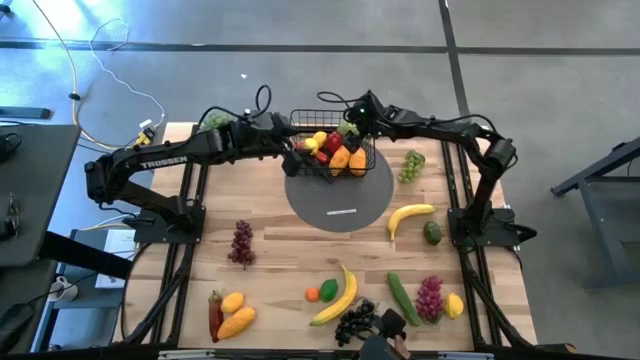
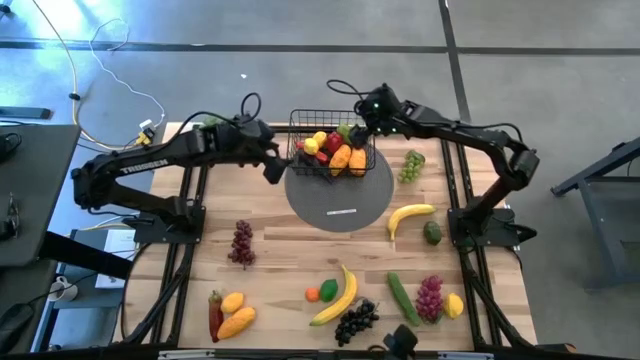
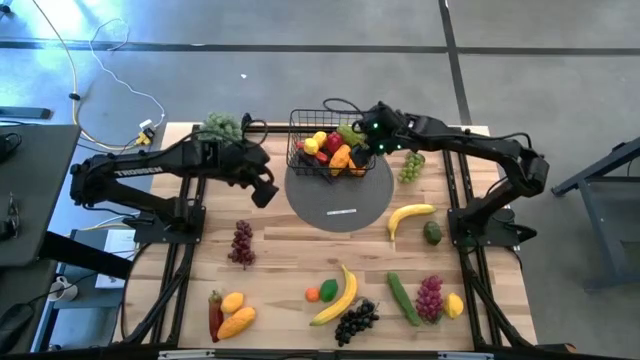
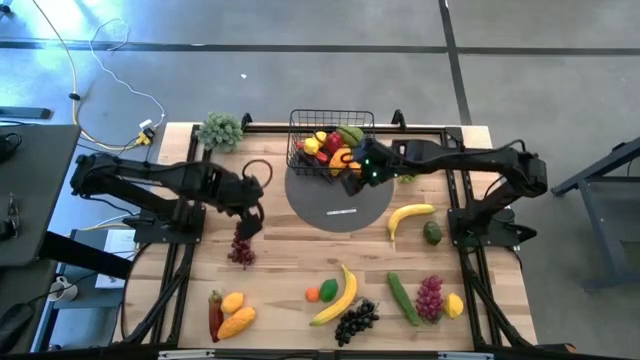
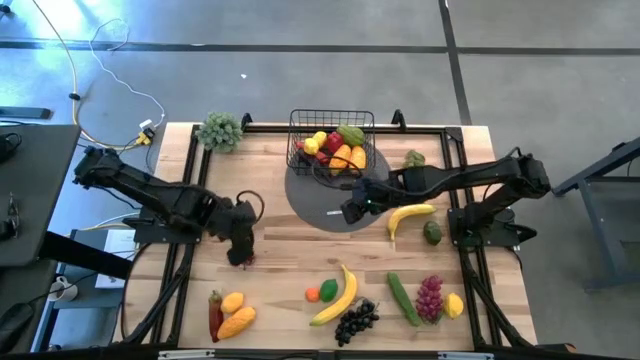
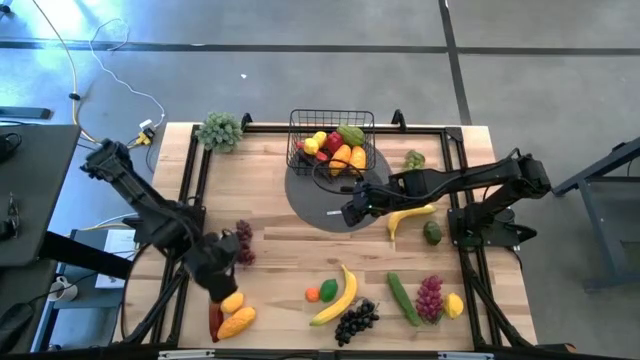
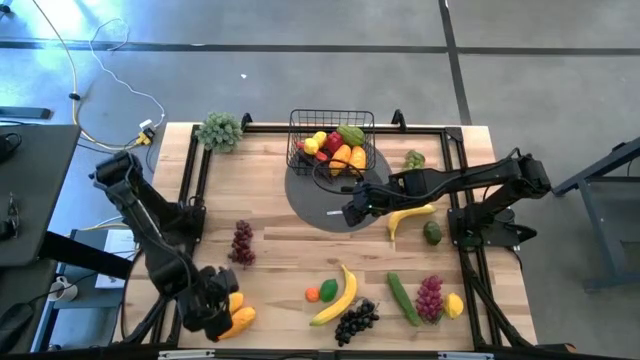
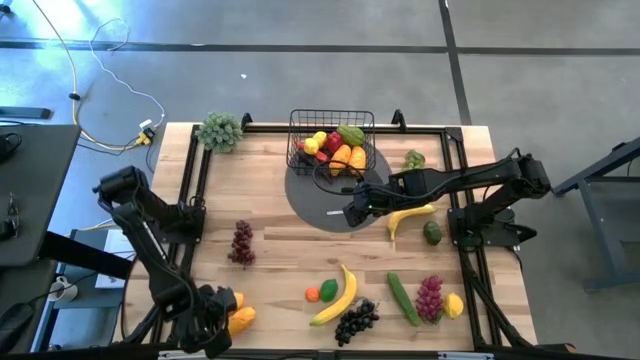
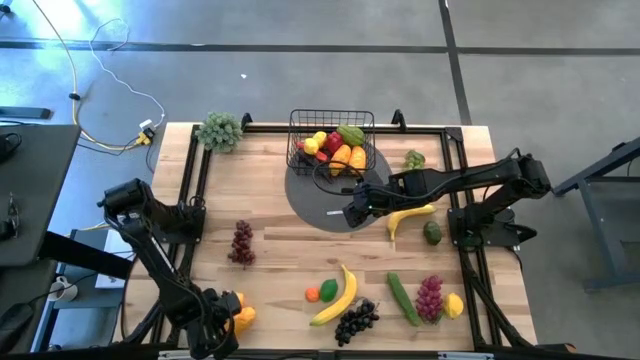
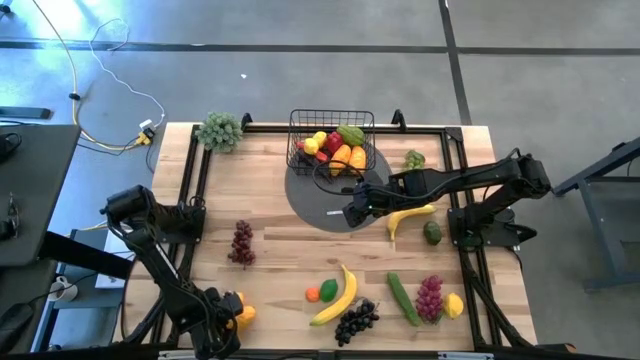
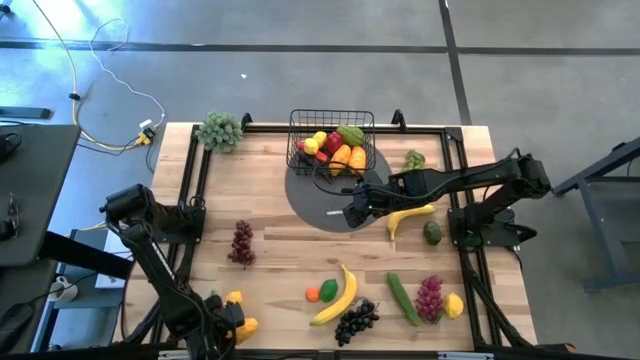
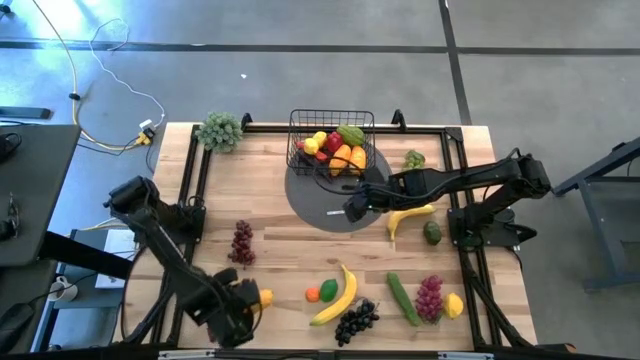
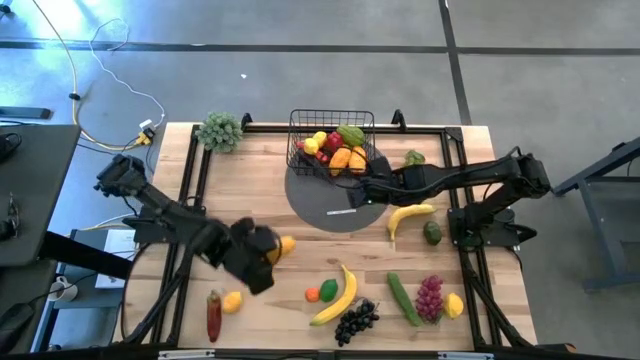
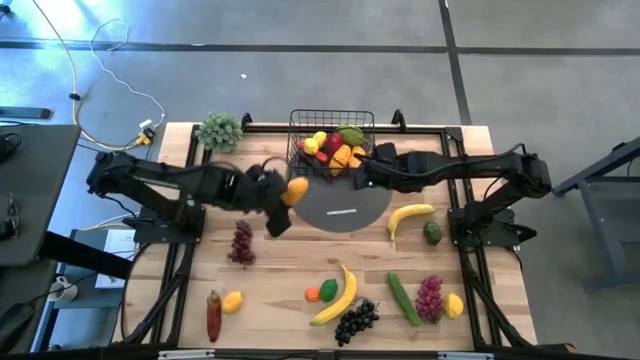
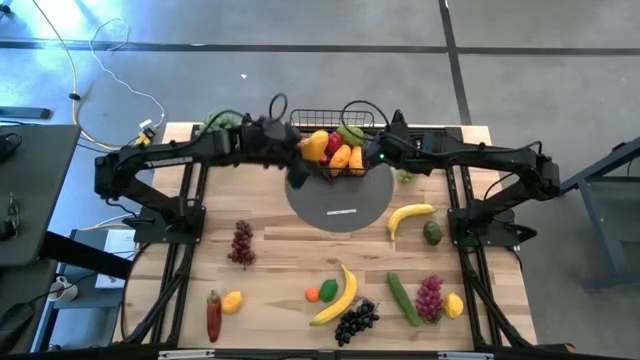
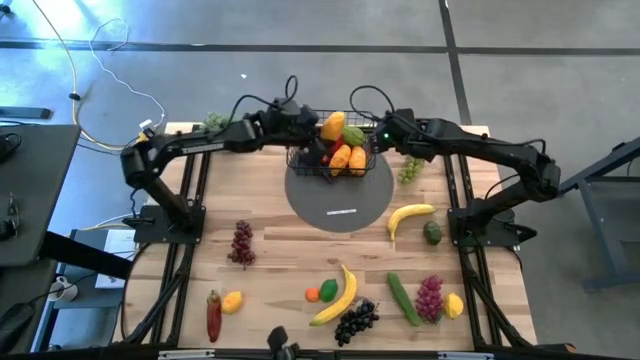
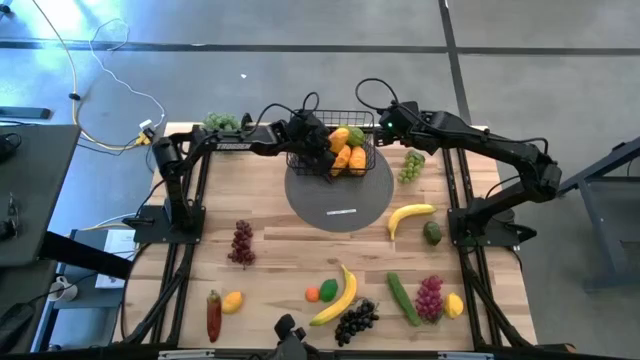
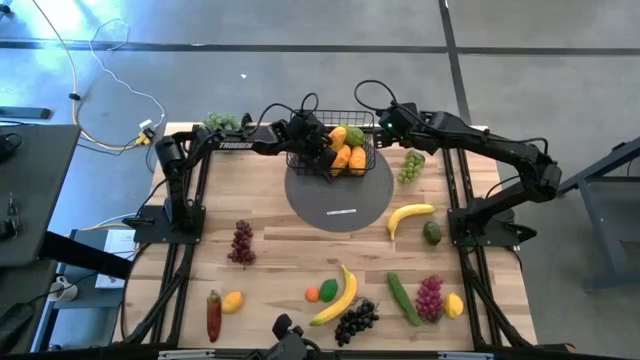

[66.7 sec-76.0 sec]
Task: Build produce basket
Put the mango into the wire basket

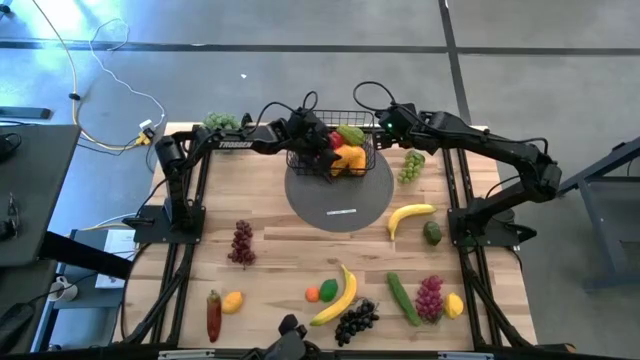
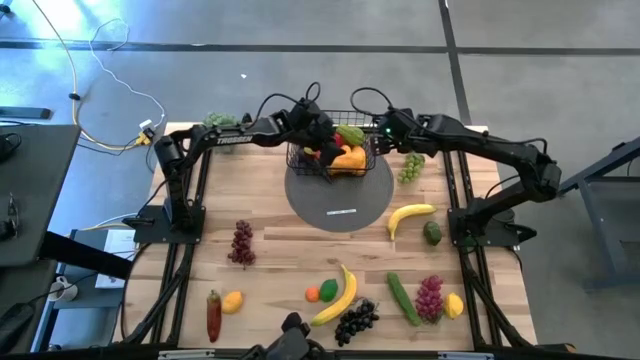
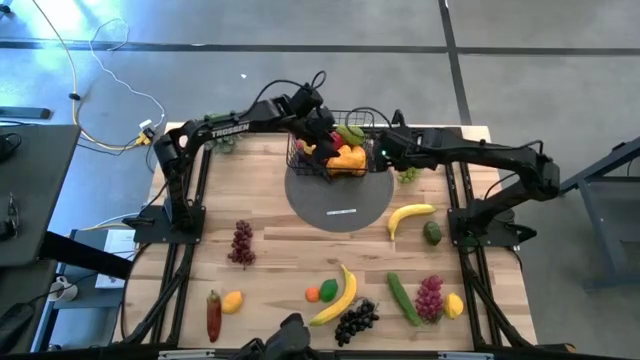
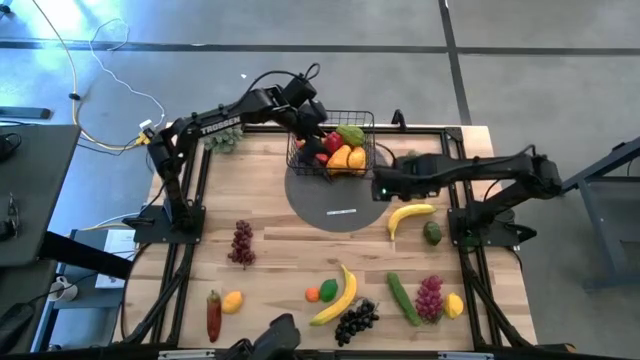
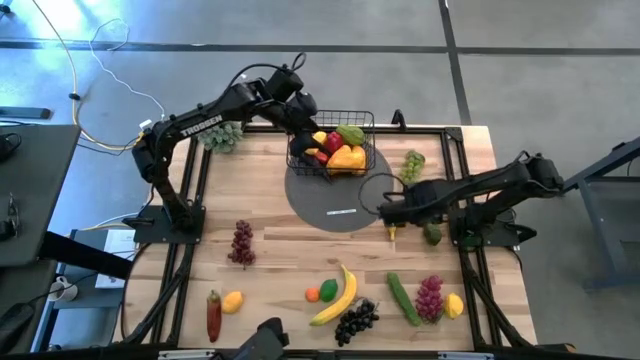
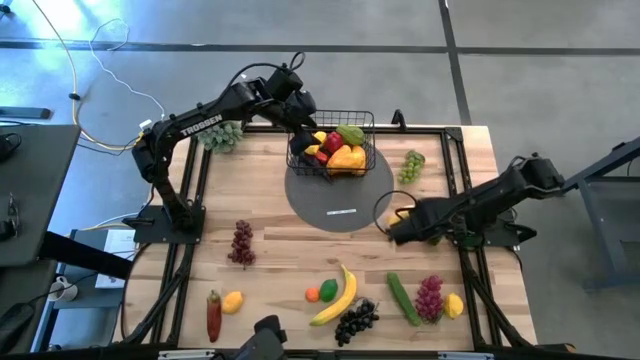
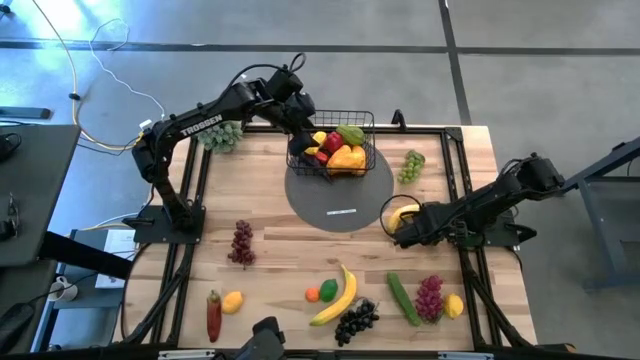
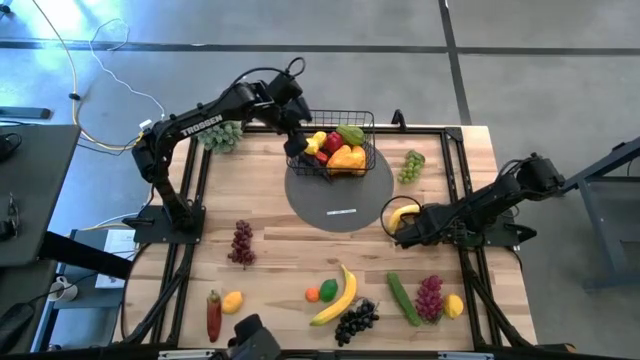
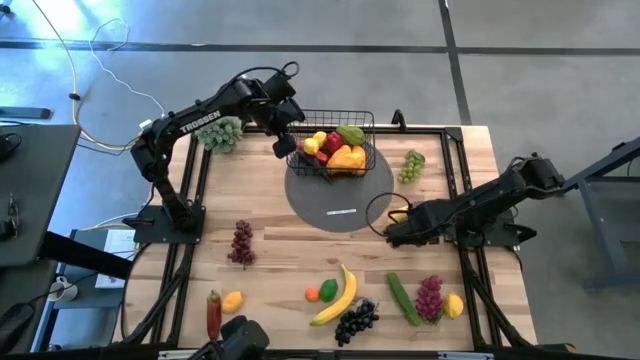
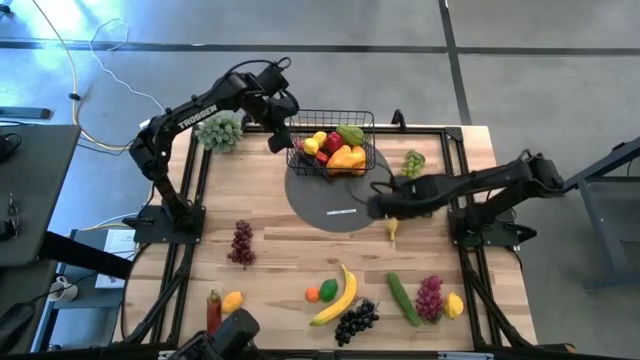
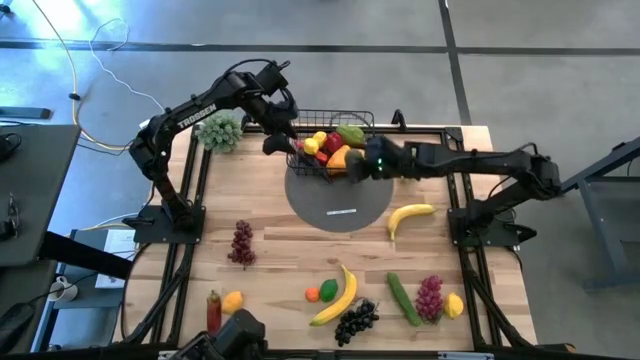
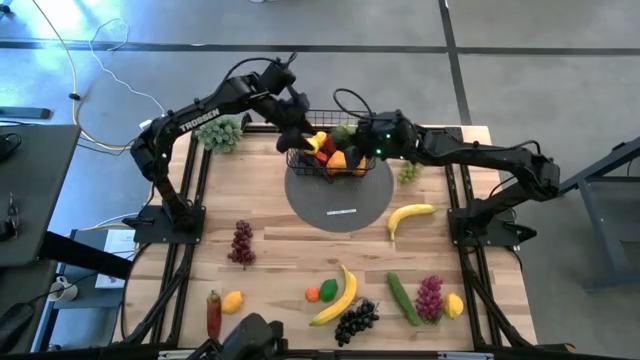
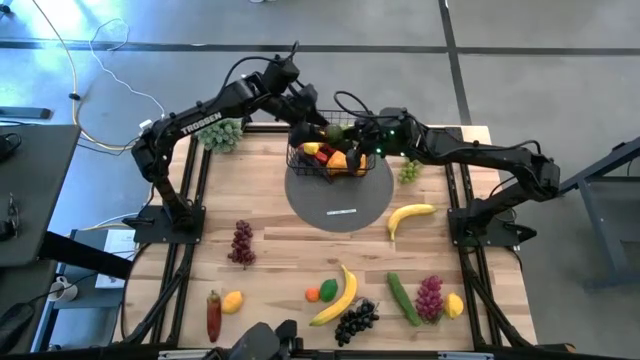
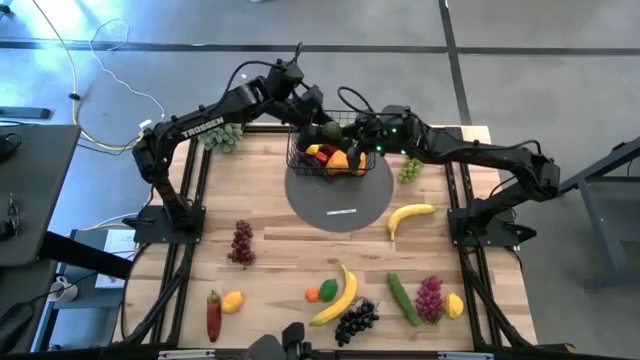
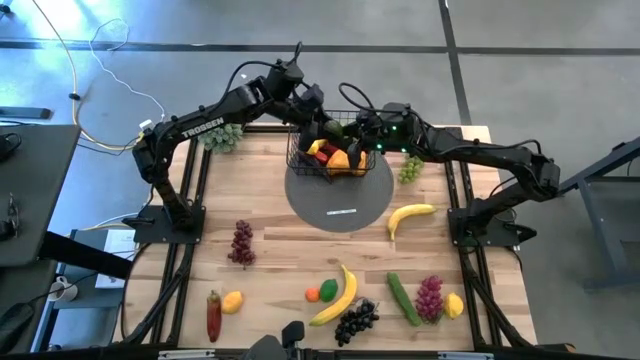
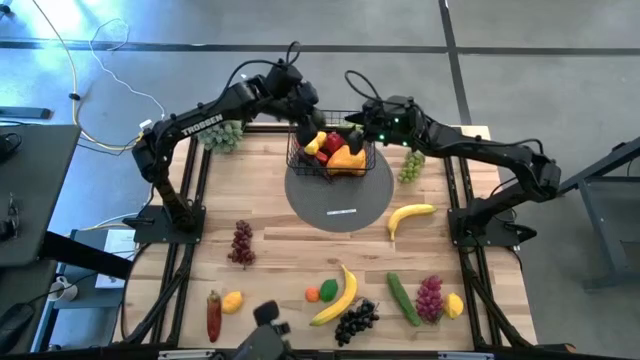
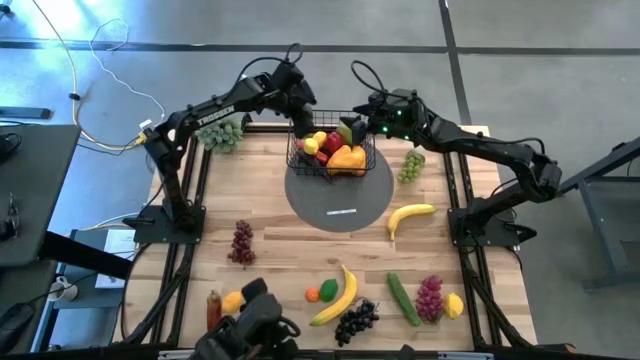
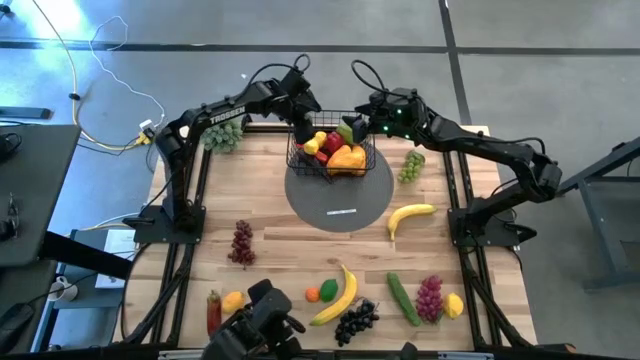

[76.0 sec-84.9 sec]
Put the lime into the wire basket

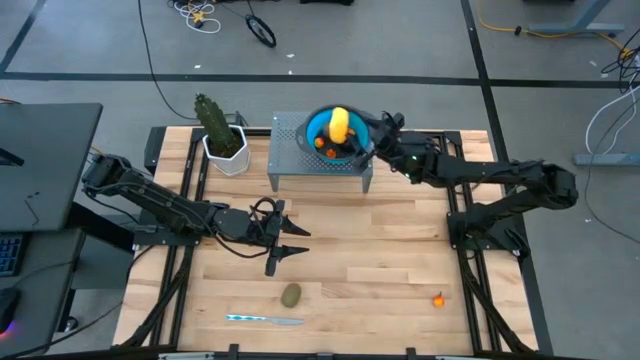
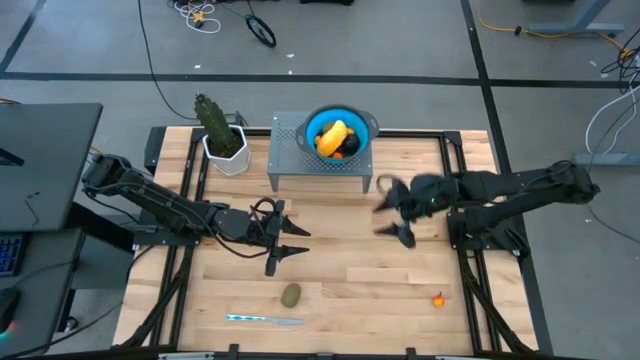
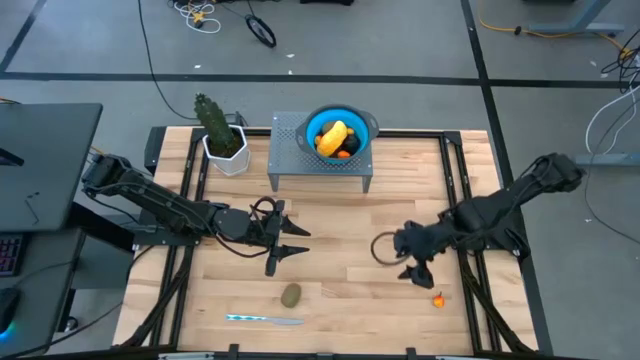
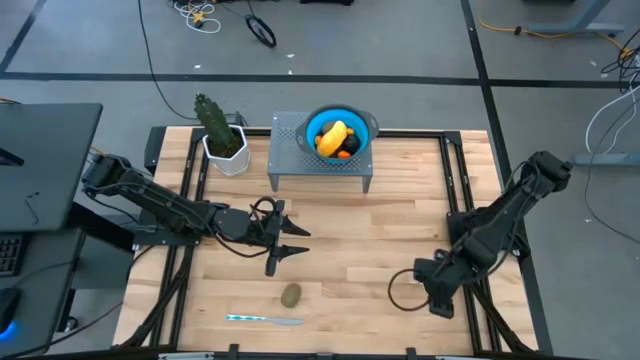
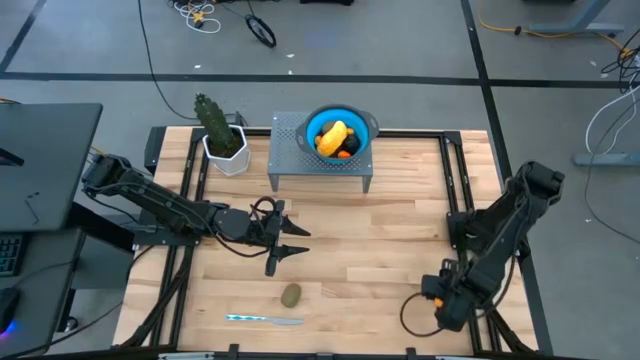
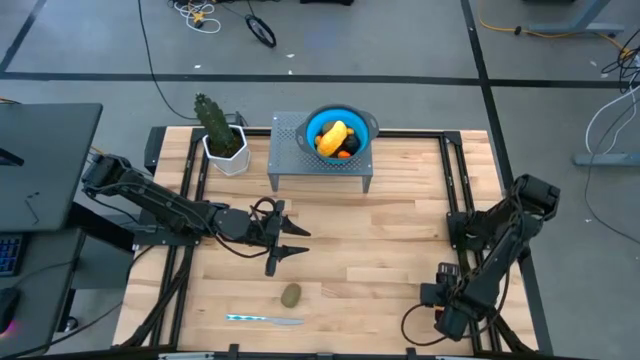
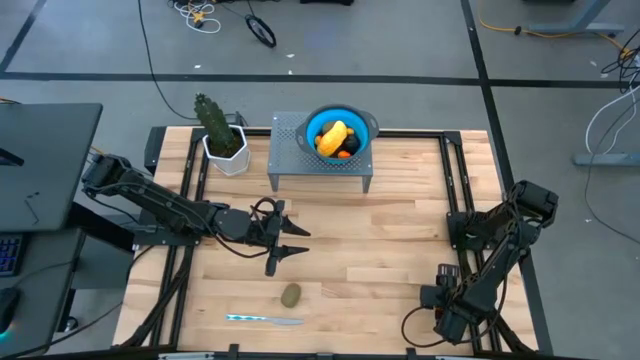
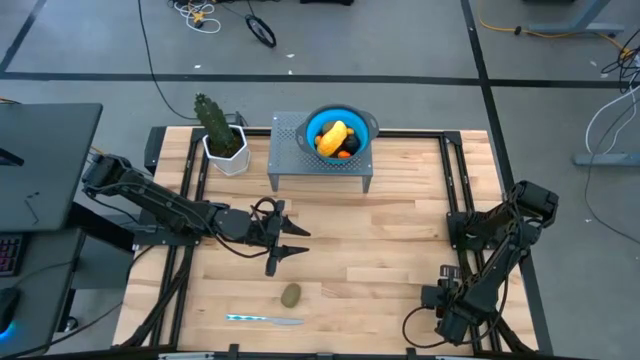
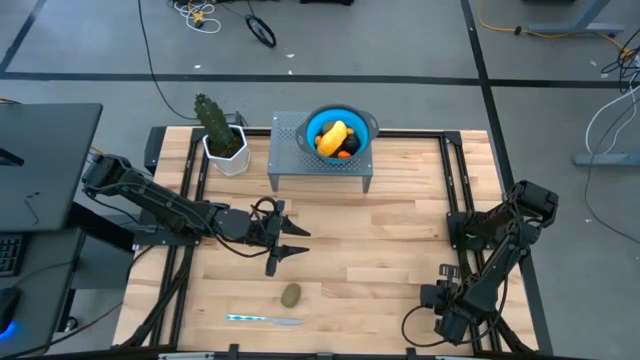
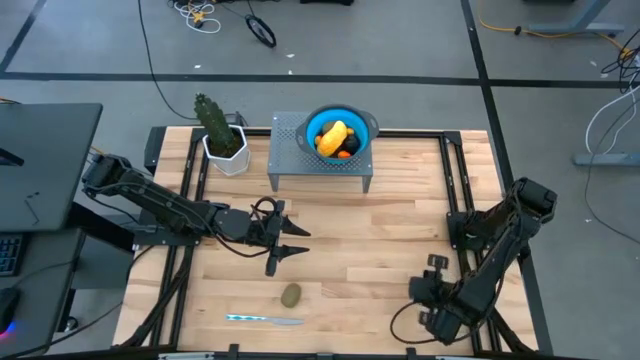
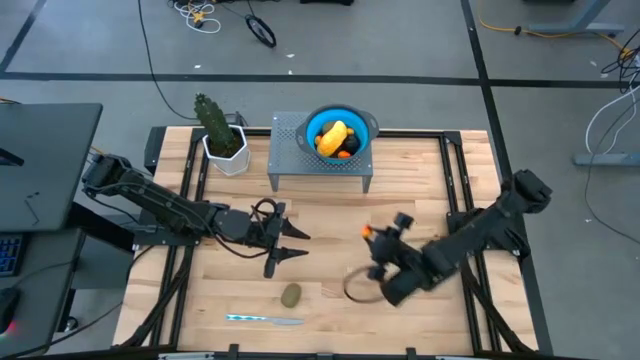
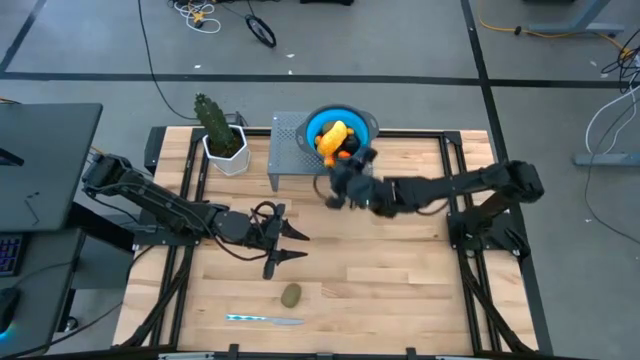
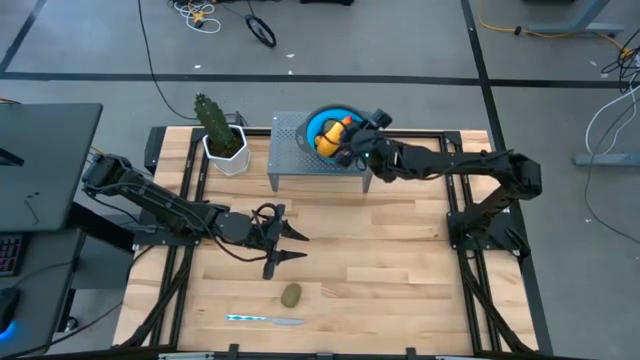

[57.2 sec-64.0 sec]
Task: Pick & Place Fruit
Put the orange peach in the blue strainer bowl on the shelf
